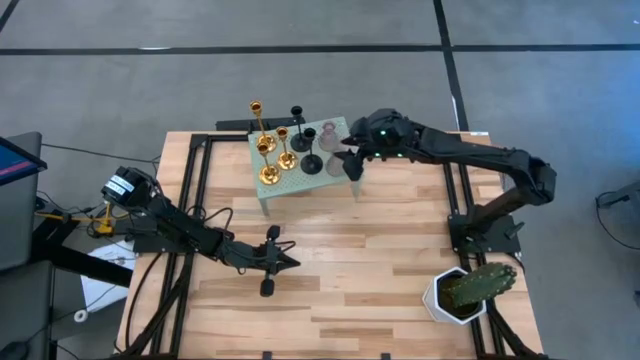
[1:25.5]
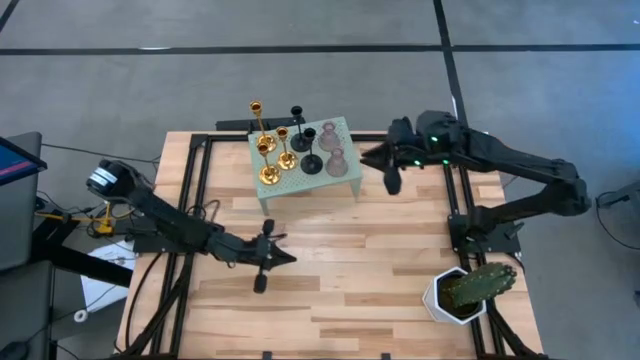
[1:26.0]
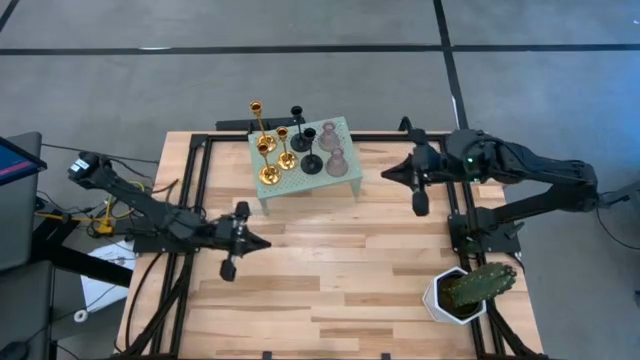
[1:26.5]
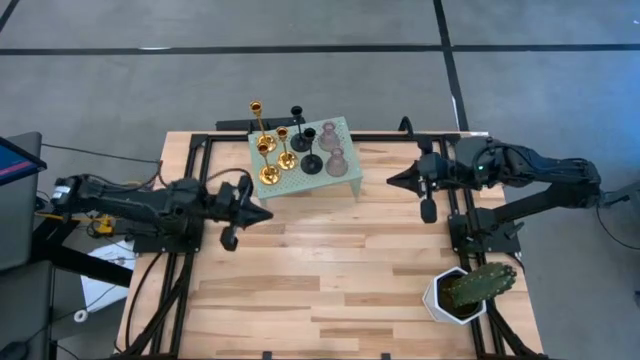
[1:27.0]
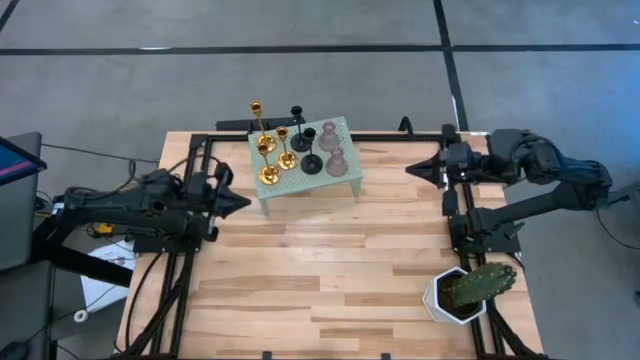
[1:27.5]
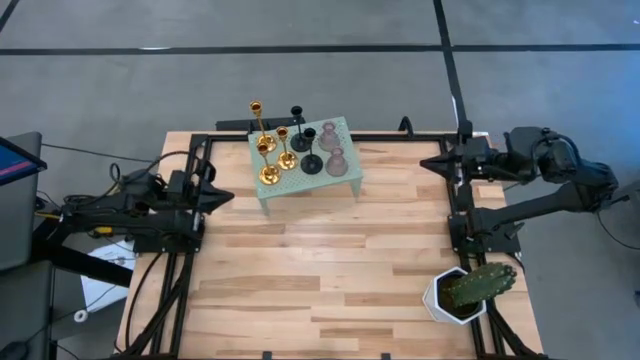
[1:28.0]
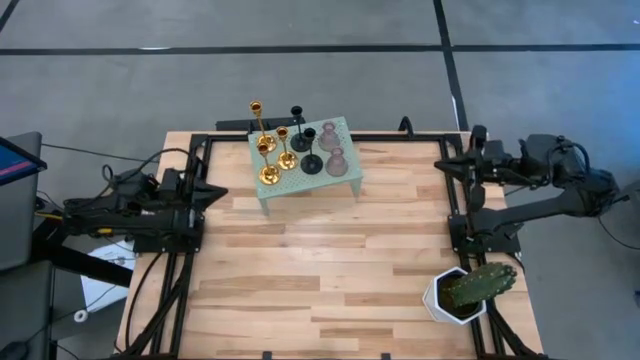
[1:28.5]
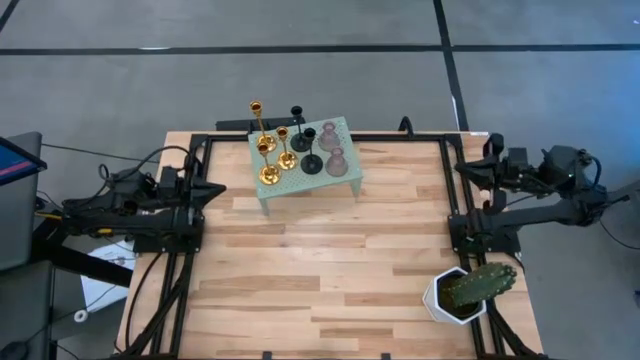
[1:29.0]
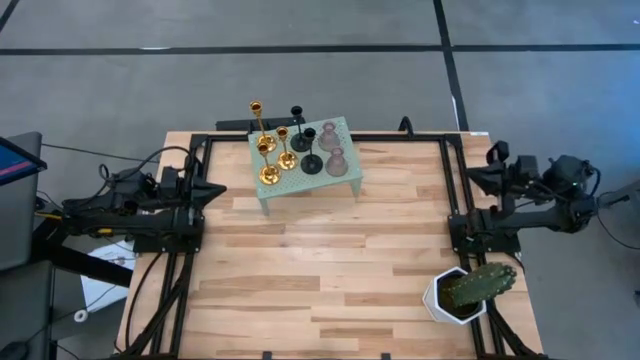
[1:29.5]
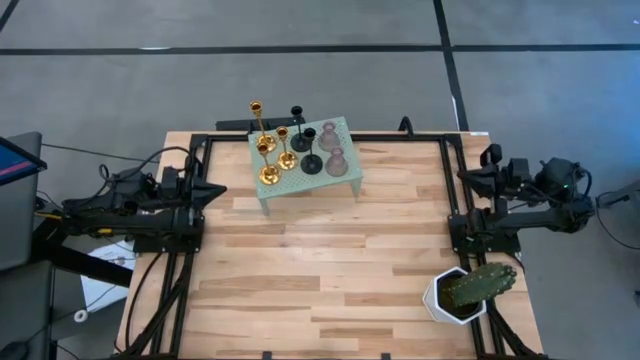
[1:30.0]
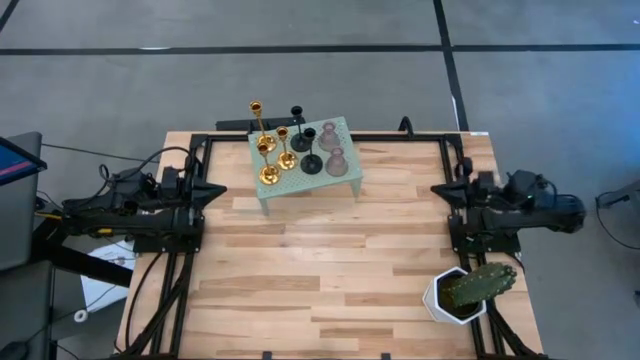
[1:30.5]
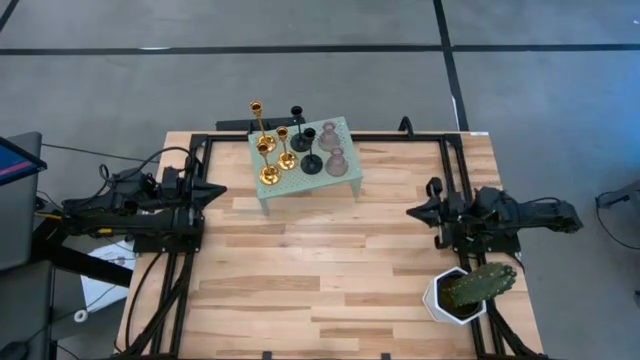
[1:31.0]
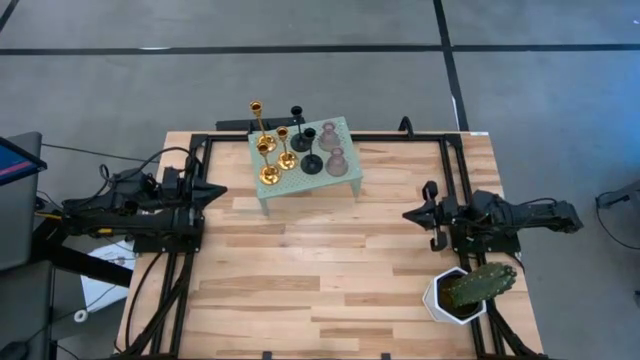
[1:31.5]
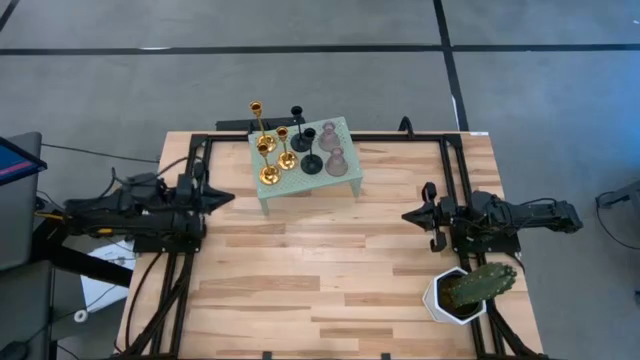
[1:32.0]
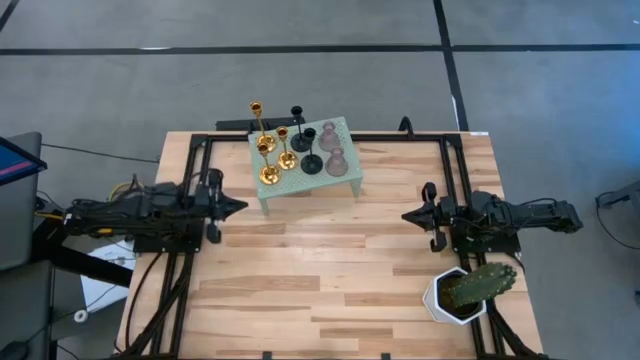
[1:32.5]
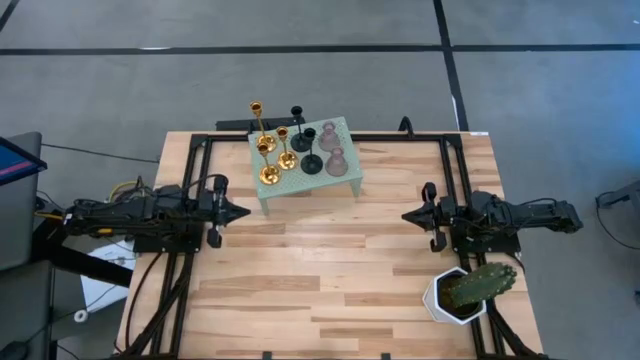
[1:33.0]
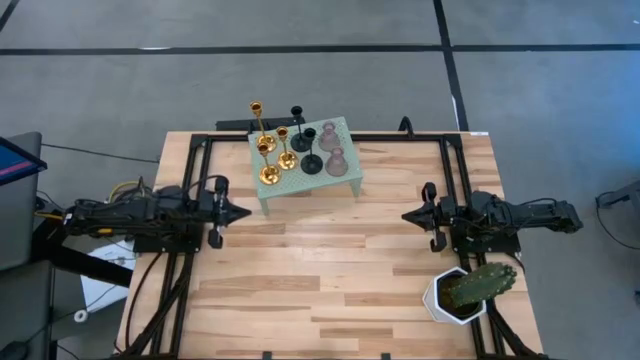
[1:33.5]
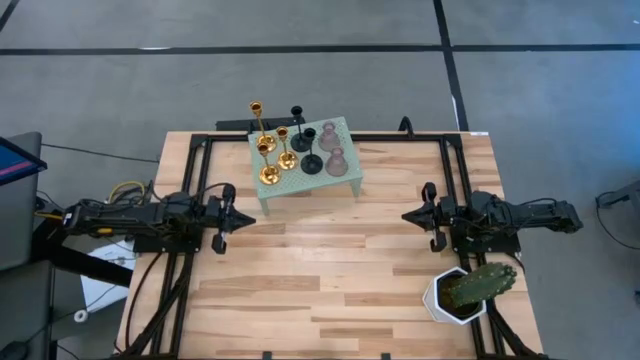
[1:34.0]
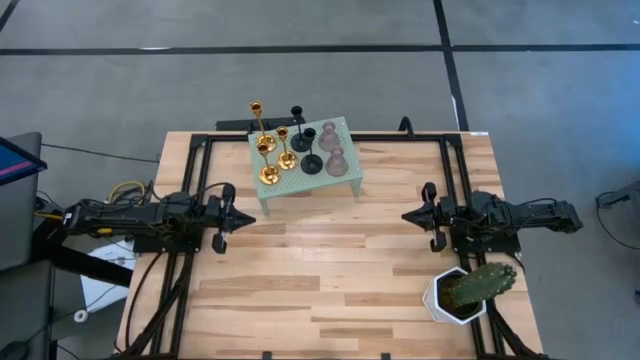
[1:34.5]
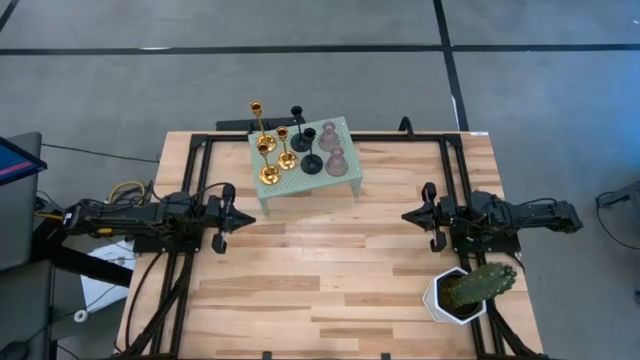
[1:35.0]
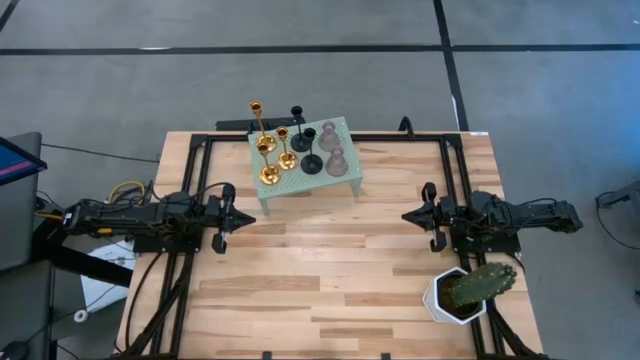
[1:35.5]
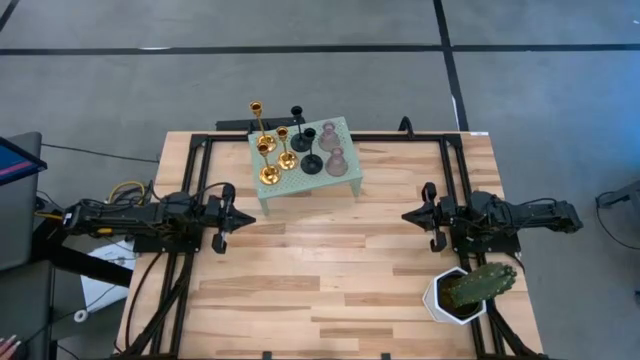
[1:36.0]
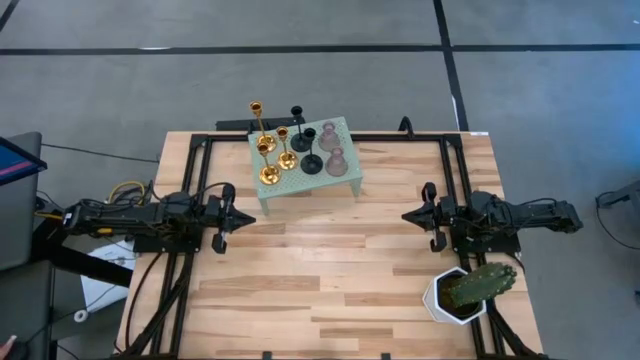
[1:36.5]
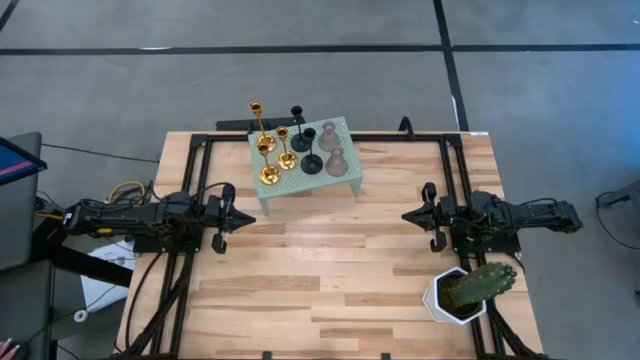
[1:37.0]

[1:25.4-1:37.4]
Task: Pick & Place candle stick holders
Return to Home Position

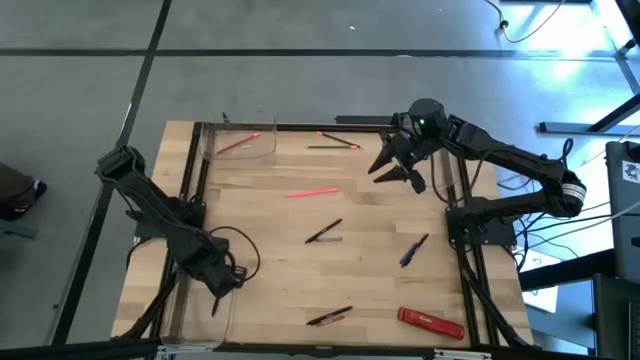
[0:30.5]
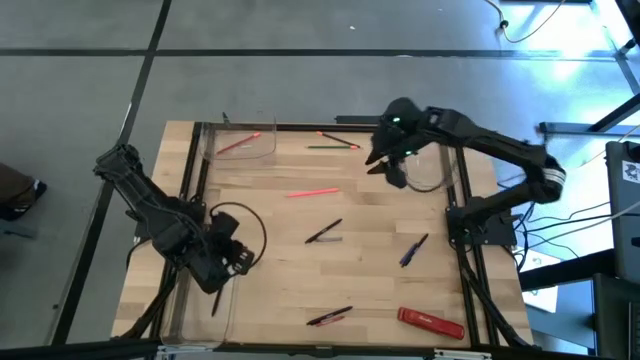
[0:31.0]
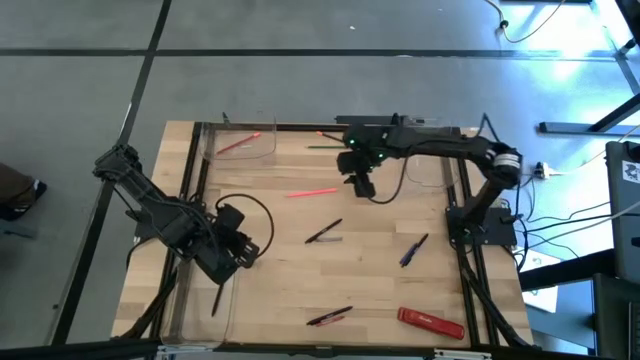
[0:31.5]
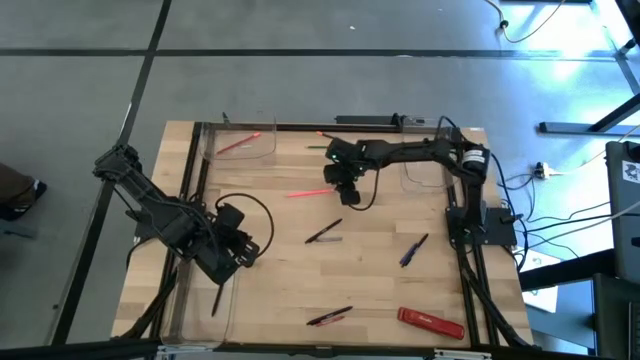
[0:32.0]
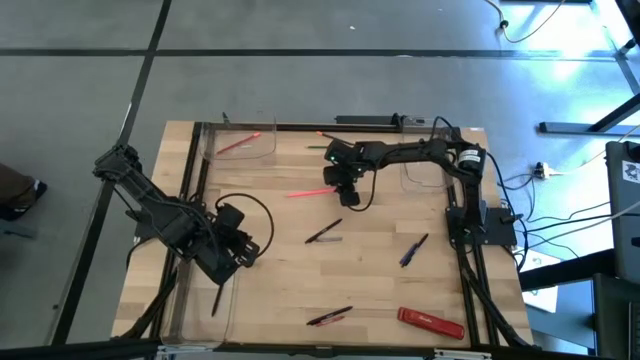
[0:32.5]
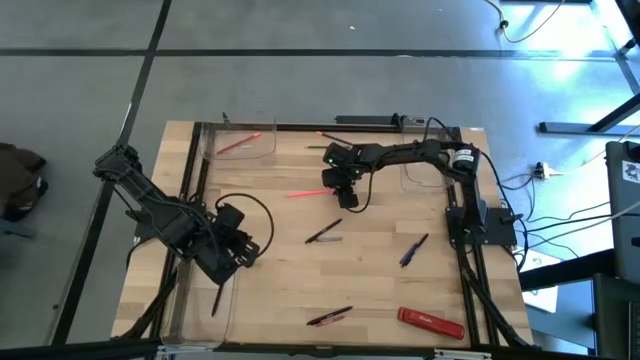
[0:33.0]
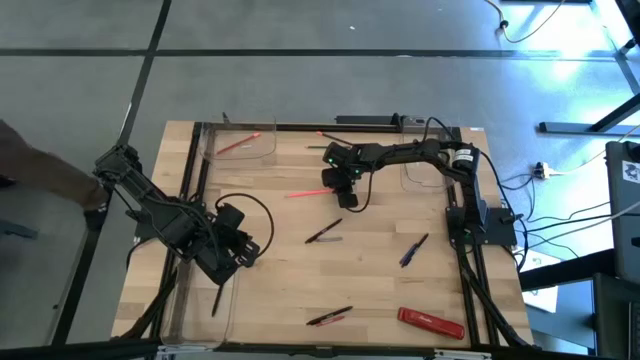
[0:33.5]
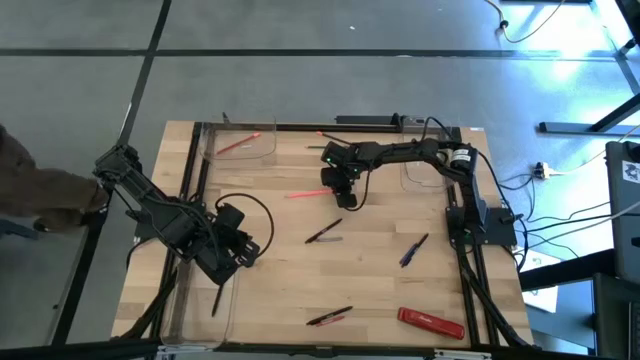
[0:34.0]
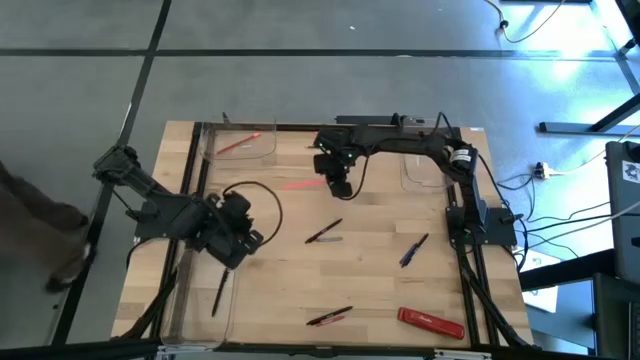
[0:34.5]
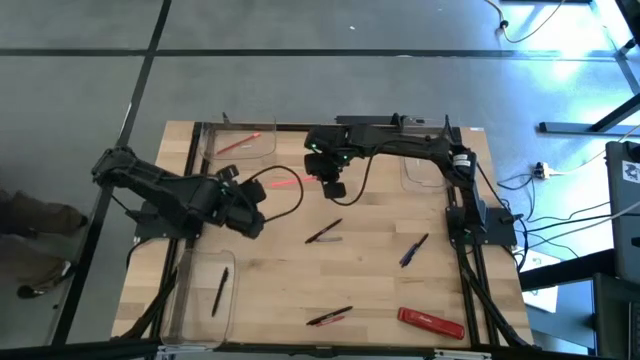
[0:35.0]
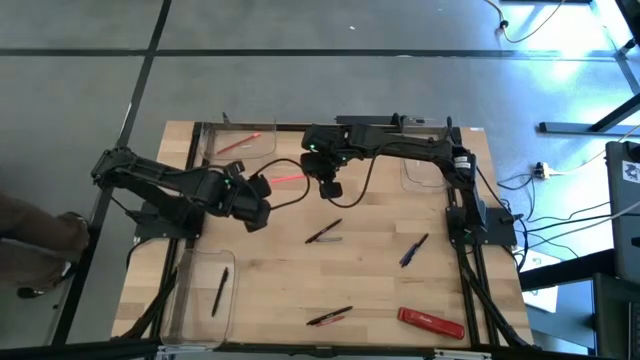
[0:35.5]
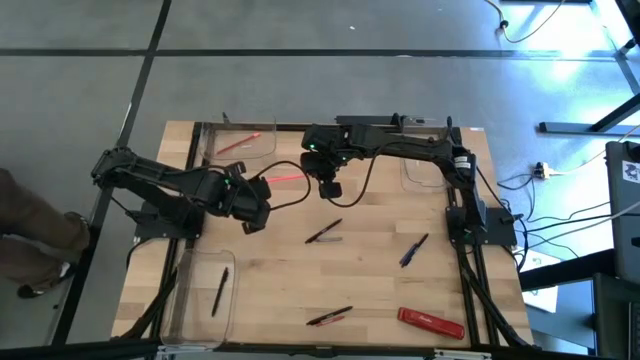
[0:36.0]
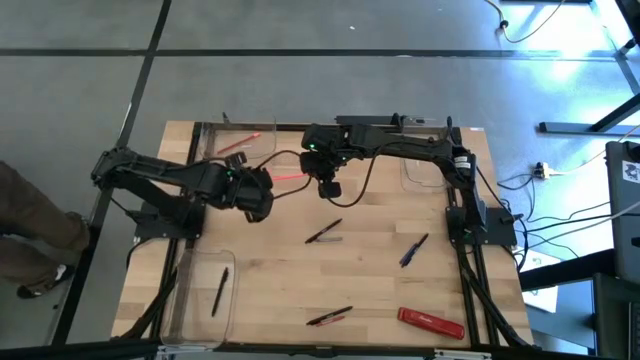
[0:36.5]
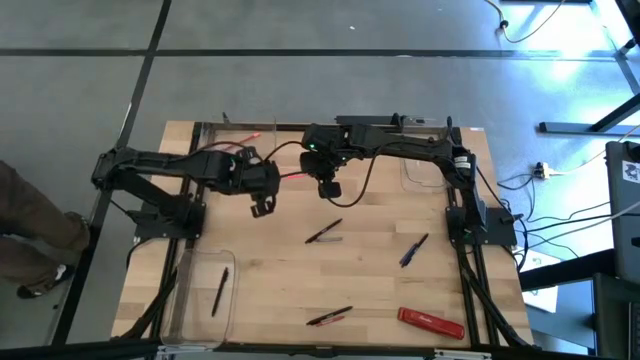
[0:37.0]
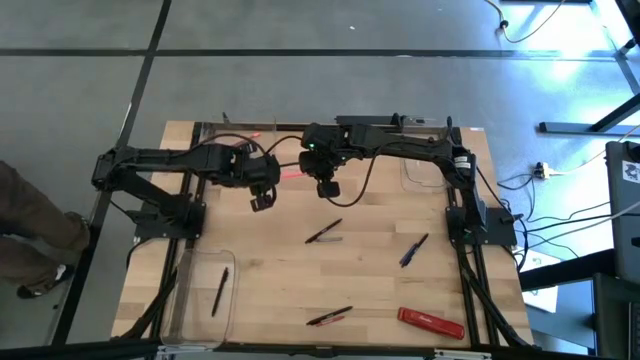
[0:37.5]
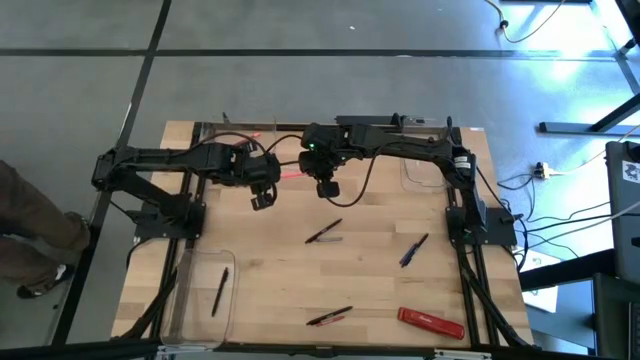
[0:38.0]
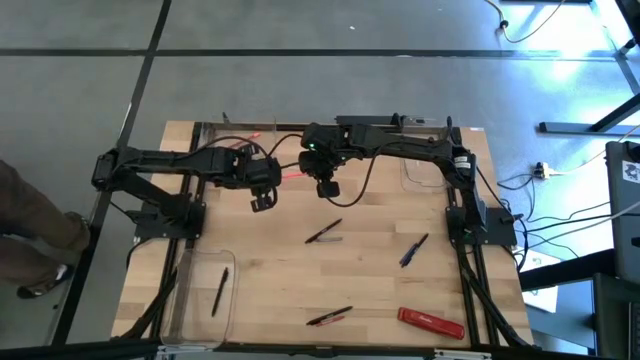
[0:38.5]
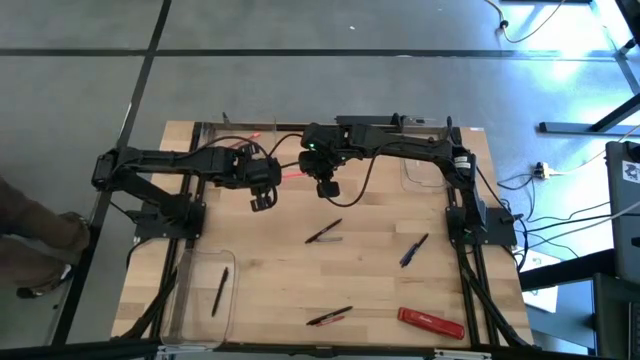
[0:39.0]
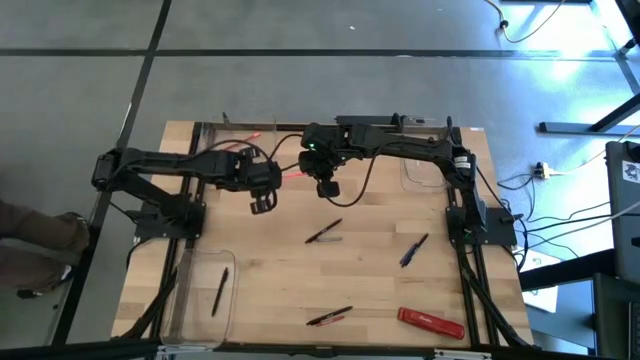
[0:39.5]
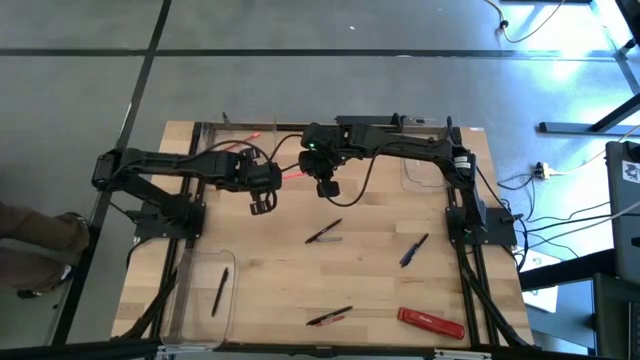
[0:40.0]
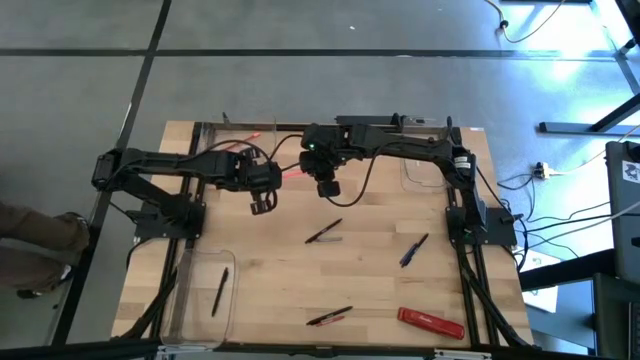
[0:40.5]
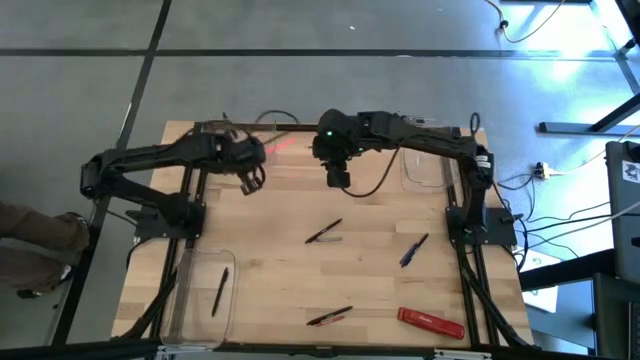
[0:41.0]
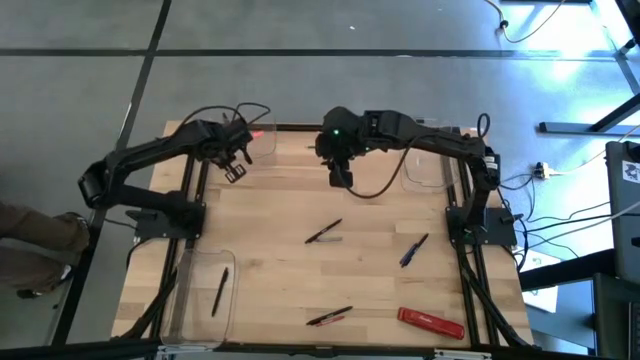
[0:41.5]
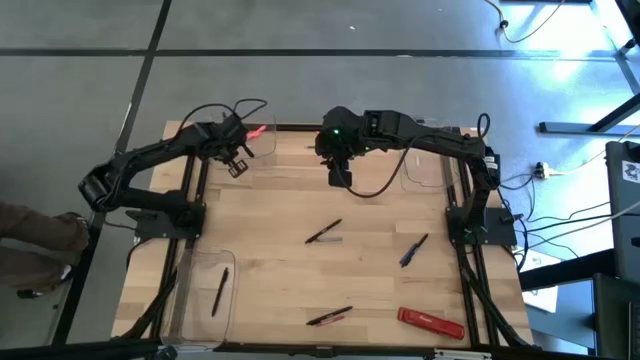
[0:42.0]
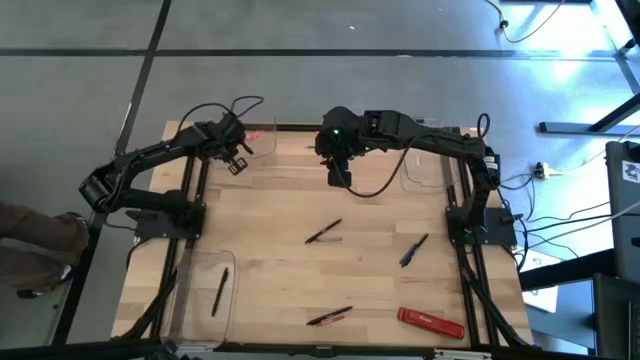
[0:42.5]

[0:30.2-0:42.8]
Task: Sort crayons/erasers/pens/pencils in bins
Put the pink pencil into the top left transparent bin
